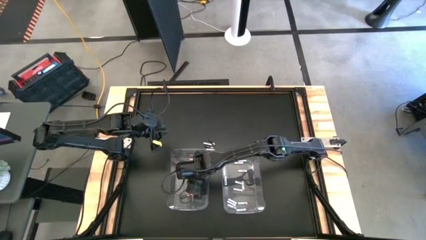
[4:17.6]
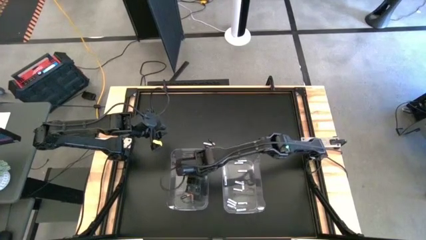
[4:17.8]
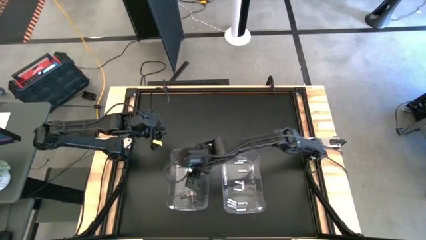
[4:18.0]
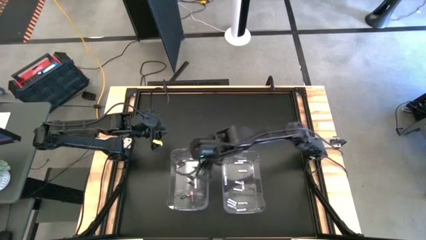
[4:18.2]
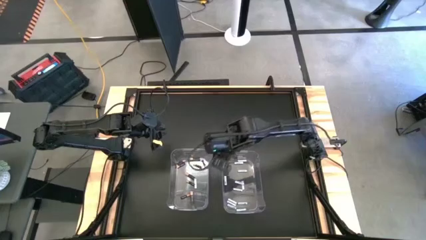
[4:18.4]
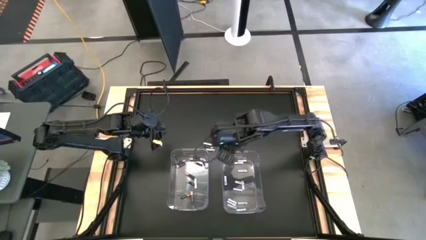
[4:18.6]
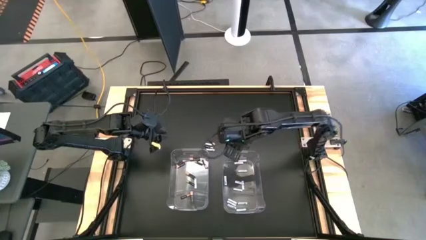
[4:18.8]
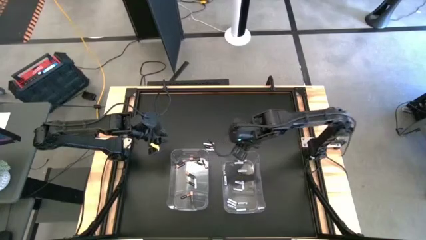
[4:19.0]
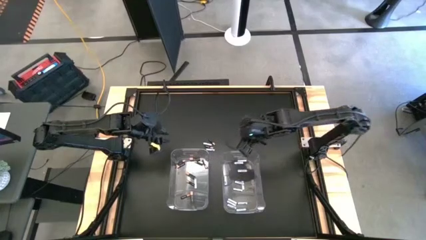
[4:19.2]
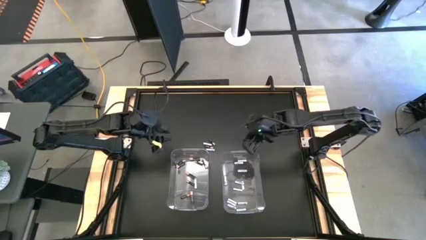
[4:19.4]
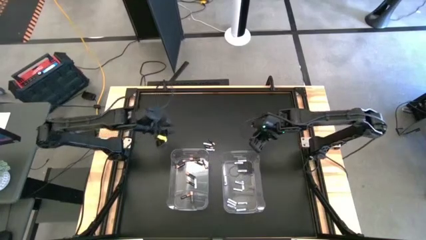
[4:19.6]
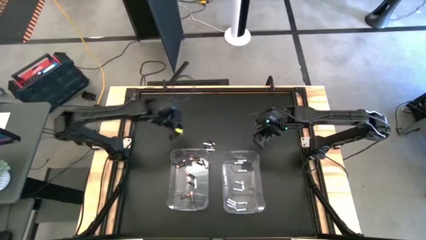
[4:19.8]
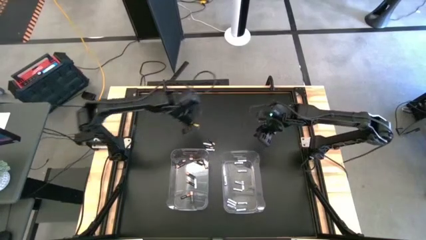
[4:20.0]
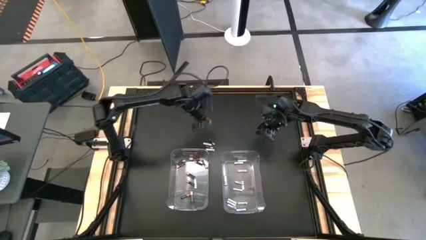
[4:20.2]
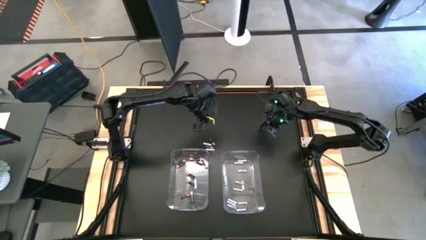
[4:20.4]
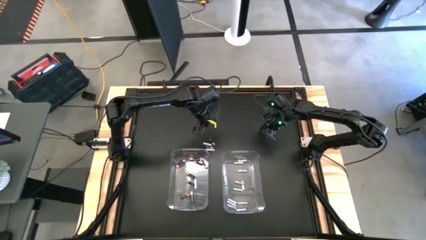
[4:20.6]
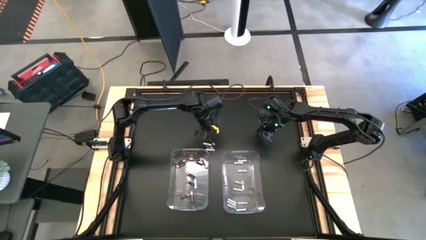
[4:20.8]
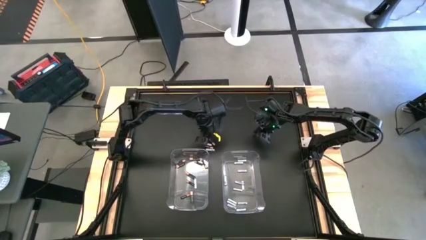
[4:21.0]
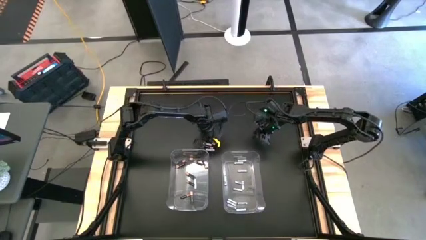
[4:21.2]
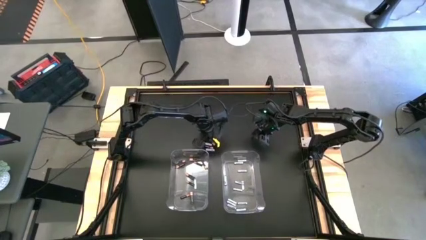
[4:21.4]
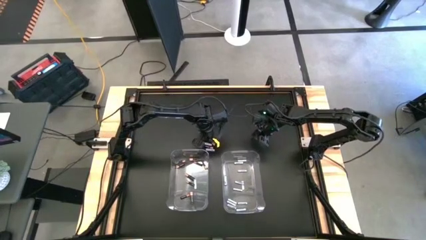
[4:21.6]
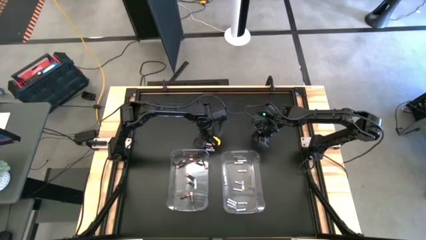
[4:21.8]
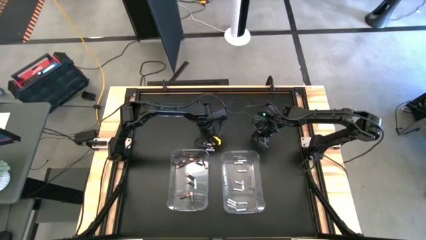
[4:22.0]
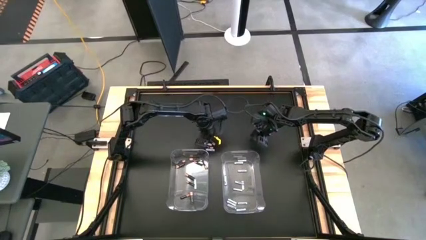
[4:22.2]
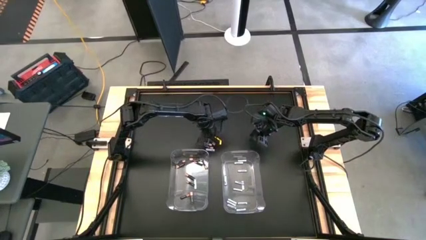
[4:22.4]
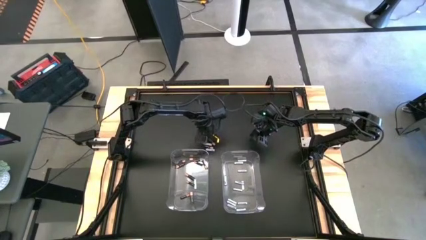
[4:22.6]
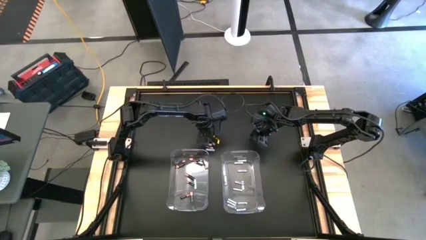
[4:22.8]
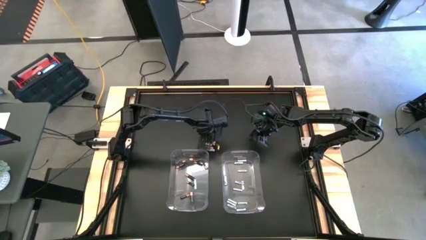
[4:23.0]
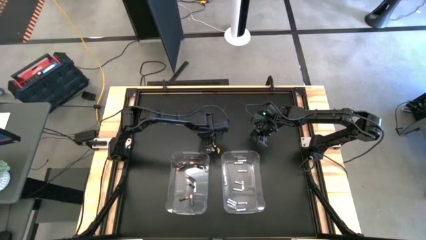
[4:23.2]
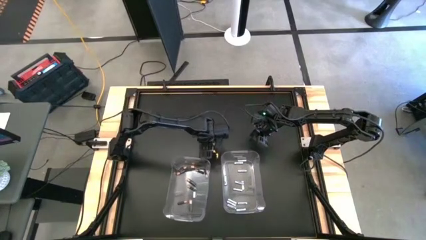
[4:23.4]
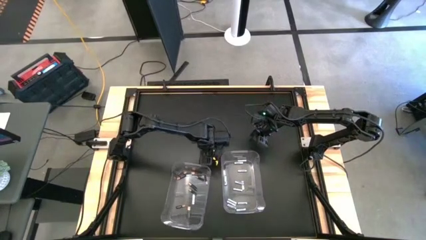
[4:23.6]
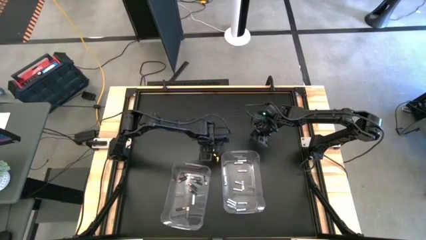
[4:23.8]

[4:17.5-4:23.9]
Task: Sort batteries
Adjust the left transparent bin

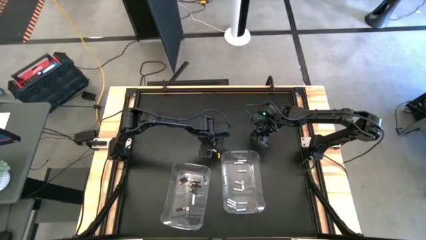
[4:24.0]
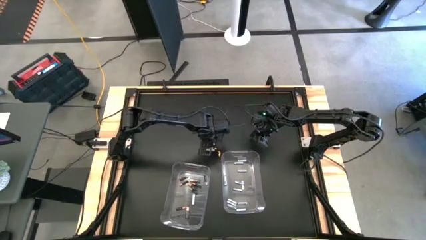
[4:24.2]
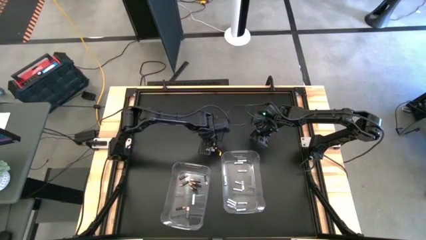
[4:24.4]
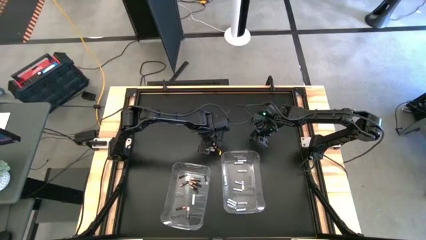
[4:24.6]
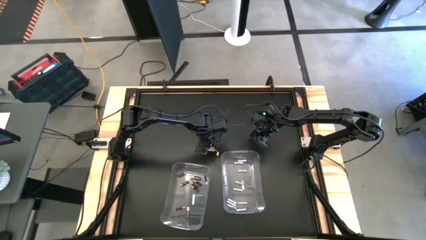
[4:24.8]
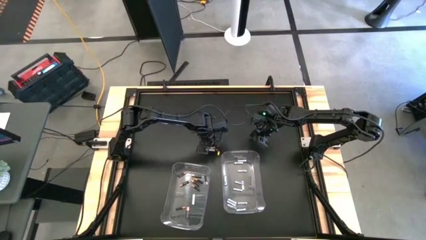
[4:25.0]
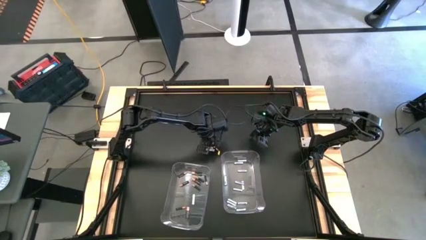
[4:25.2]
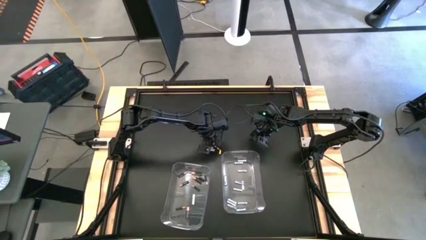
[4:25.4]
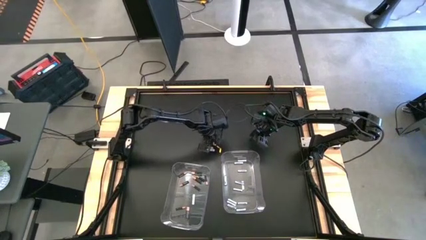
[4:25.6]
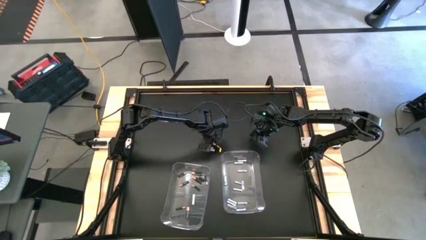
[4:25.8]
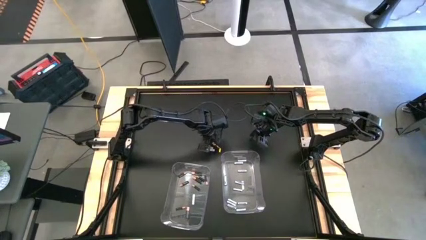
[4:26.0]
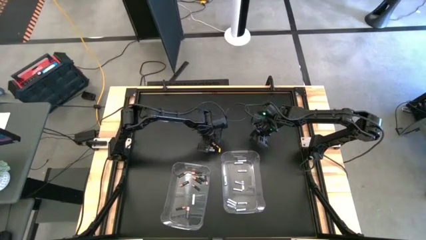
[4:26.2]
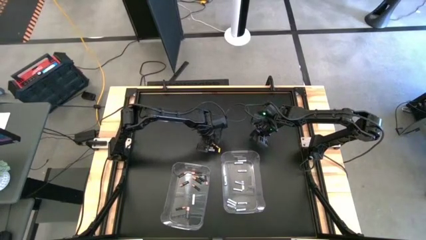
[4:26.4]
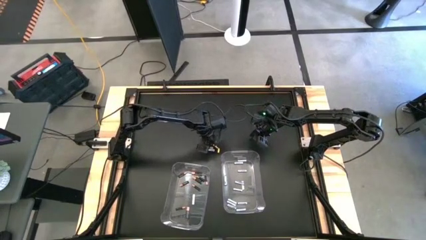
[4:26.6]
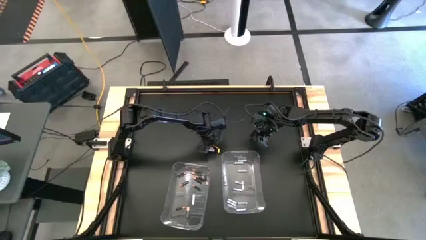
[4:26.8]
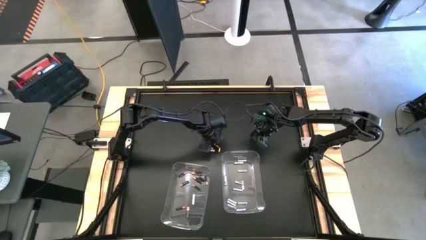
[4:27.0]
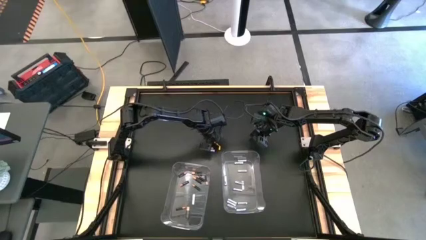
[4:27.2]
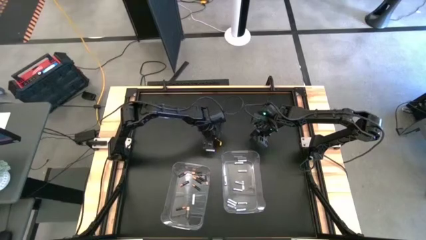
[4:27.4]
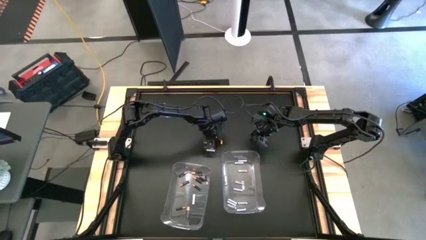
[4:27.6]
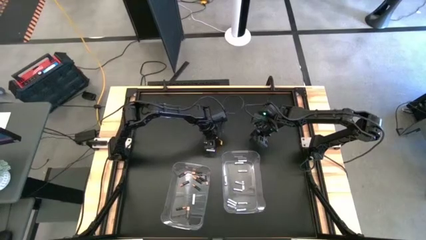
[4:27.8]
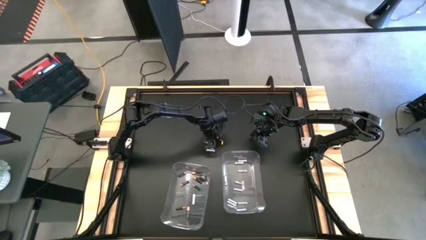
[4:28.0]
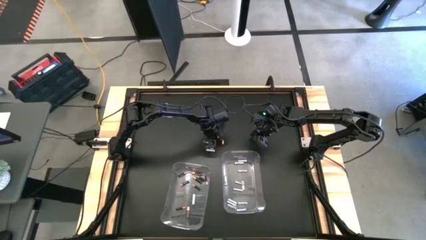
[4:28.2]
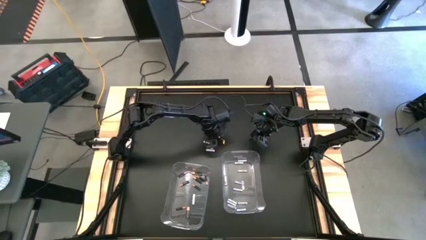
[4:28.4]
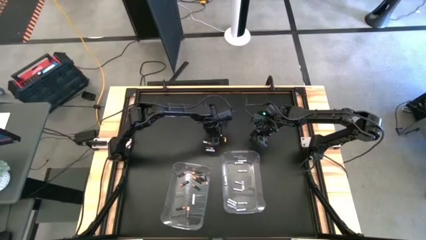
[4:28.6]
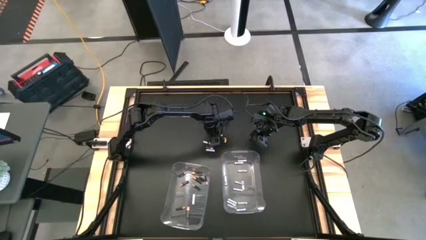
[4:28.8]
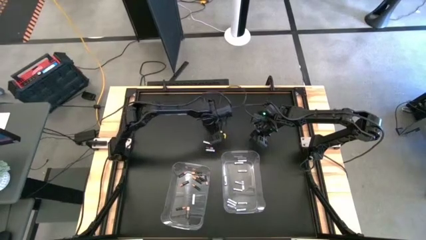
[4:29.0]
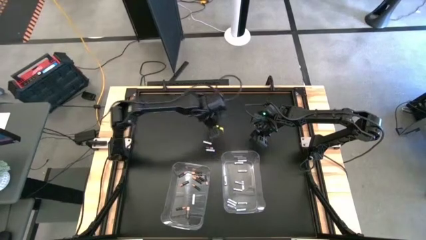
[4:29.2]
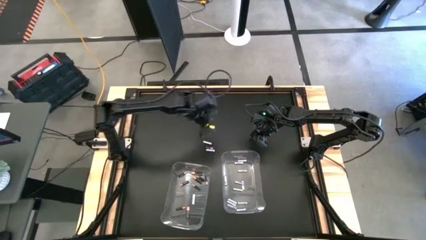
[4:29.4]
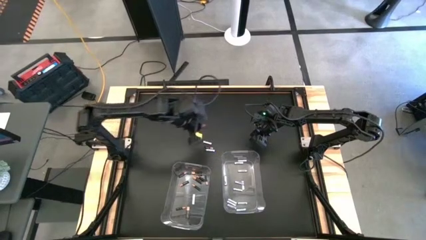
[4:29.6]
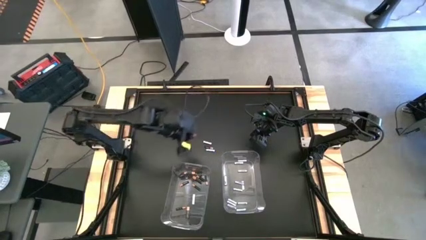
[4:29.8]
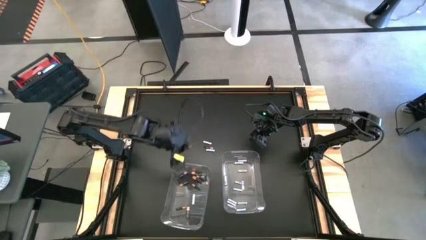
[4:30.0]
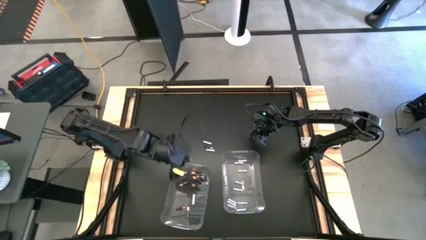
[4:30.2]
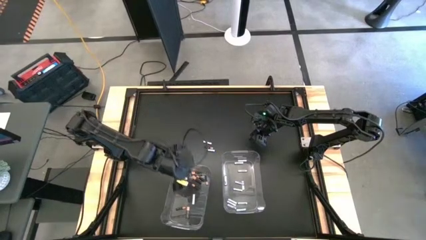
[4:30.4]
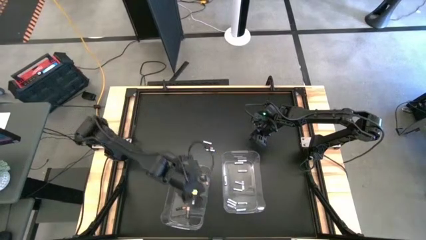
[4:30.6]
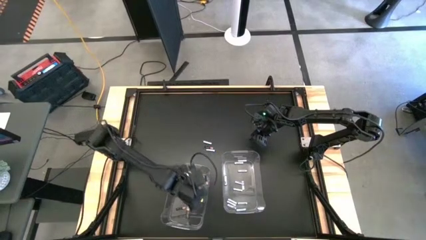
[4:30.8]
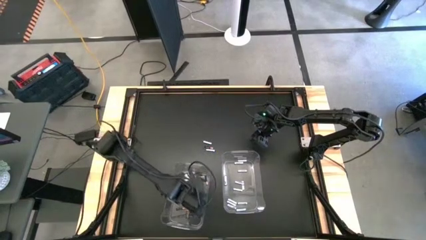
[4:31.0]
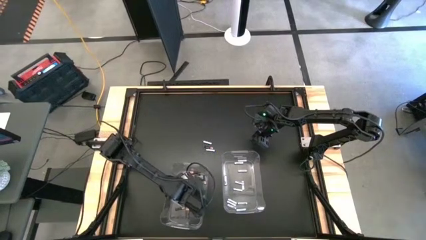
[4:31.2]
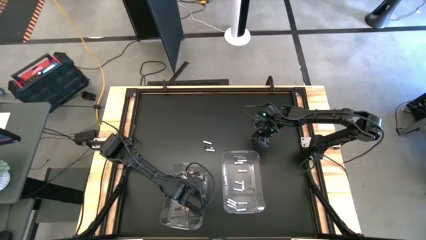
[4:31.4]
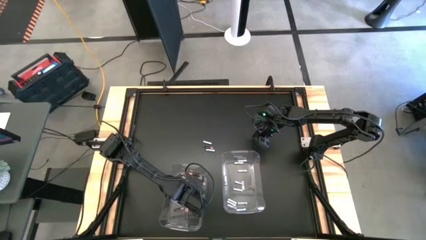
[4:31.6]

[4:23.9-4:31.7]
Put the black battery into the left transparent bin
